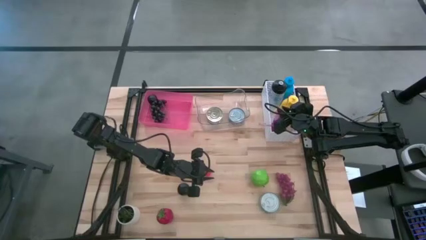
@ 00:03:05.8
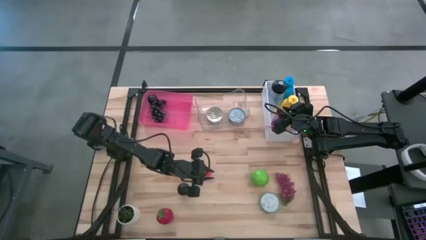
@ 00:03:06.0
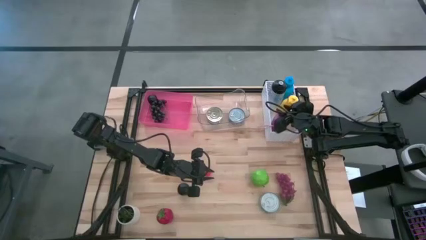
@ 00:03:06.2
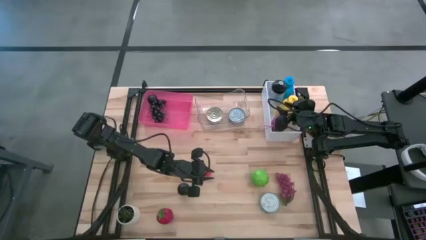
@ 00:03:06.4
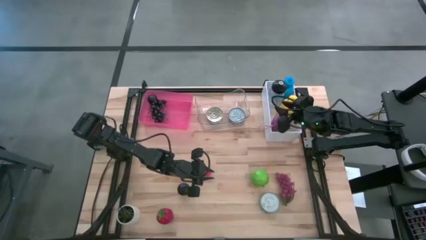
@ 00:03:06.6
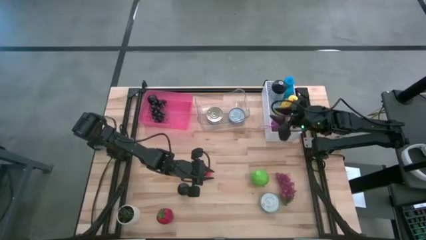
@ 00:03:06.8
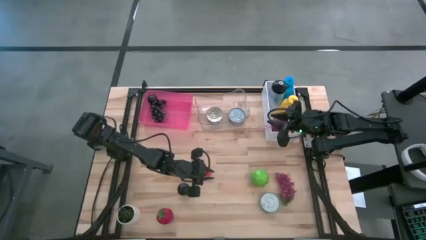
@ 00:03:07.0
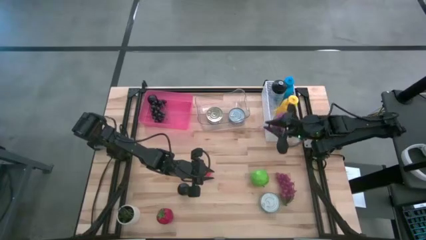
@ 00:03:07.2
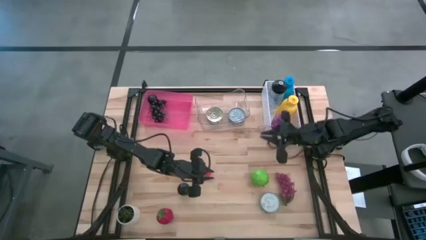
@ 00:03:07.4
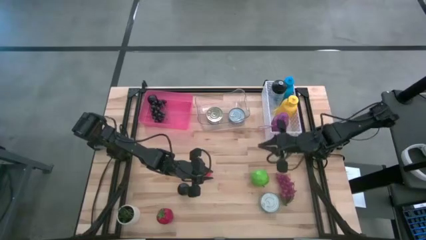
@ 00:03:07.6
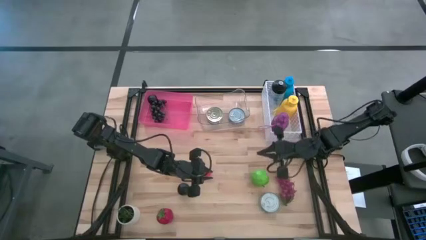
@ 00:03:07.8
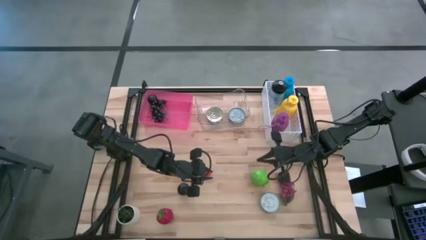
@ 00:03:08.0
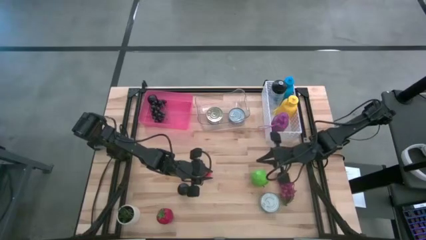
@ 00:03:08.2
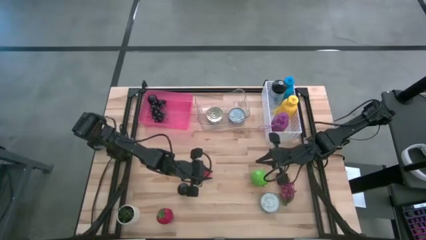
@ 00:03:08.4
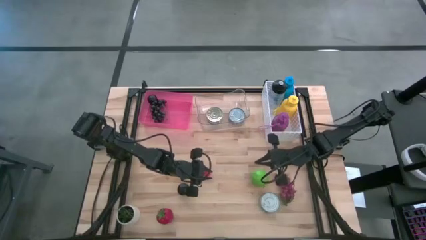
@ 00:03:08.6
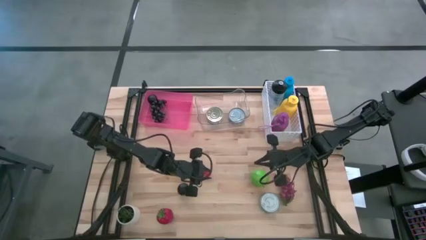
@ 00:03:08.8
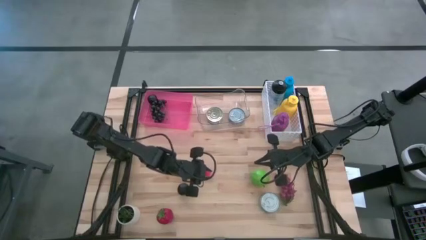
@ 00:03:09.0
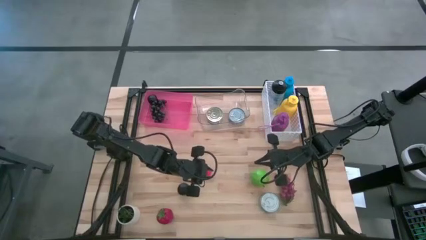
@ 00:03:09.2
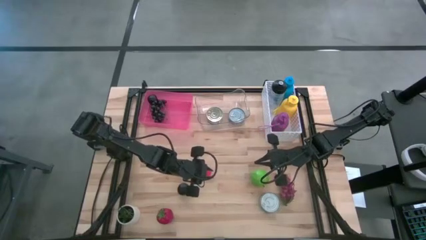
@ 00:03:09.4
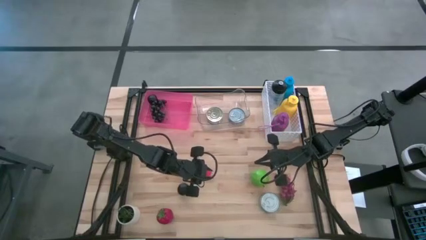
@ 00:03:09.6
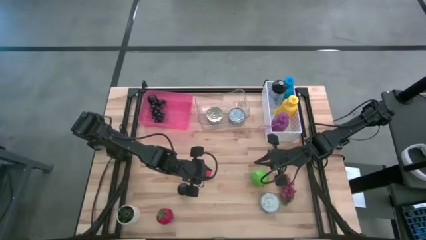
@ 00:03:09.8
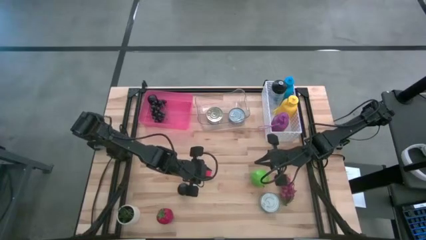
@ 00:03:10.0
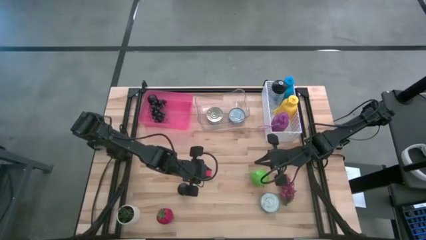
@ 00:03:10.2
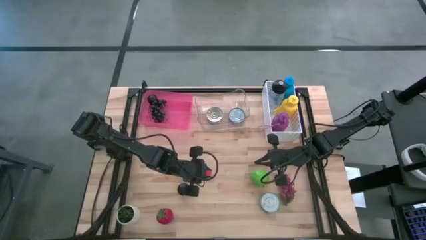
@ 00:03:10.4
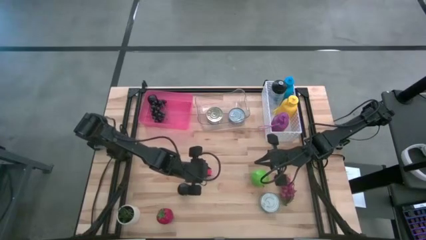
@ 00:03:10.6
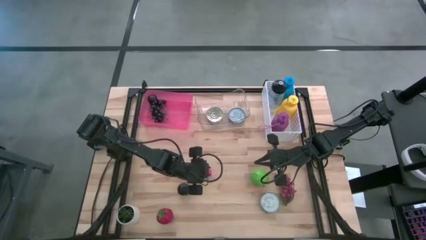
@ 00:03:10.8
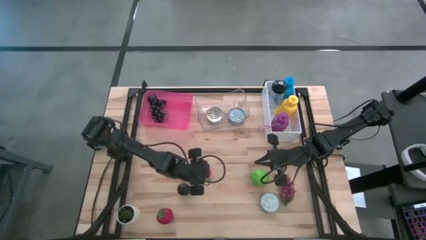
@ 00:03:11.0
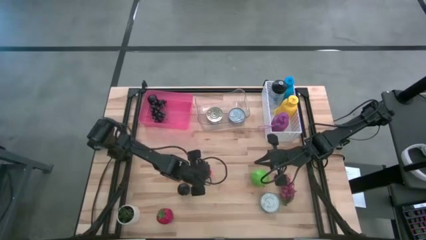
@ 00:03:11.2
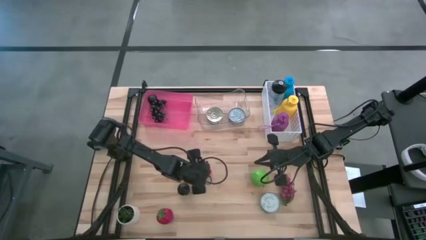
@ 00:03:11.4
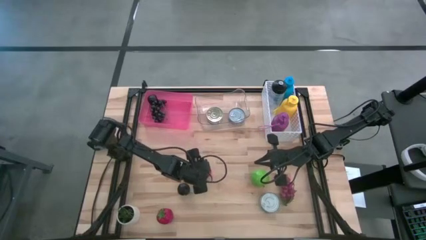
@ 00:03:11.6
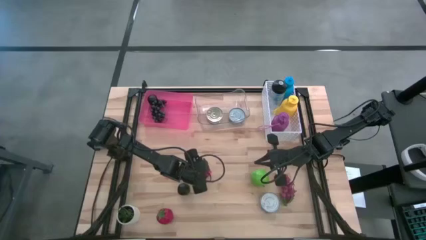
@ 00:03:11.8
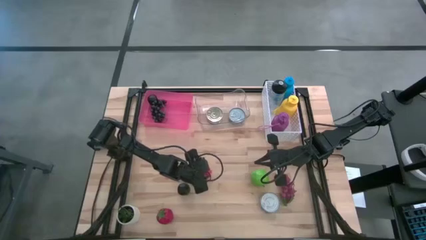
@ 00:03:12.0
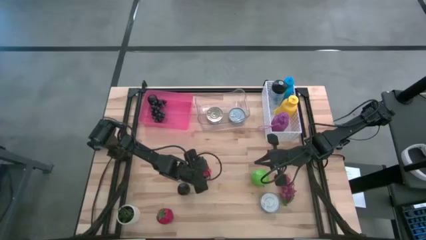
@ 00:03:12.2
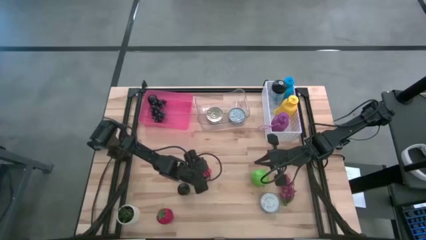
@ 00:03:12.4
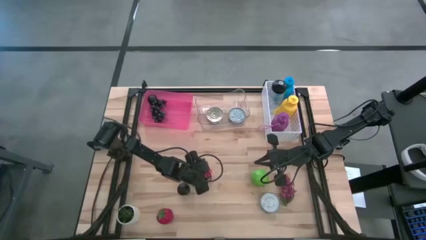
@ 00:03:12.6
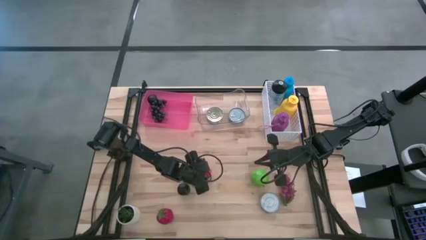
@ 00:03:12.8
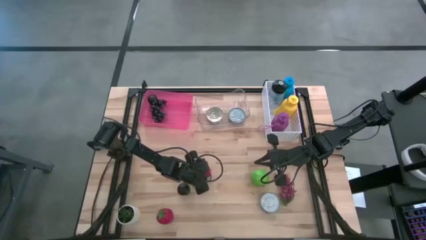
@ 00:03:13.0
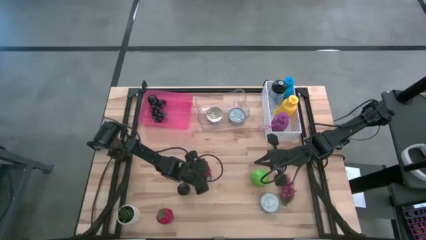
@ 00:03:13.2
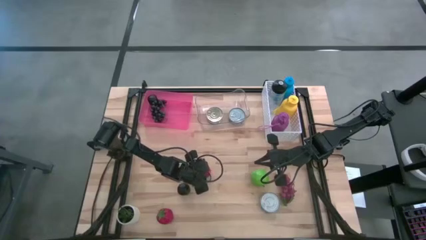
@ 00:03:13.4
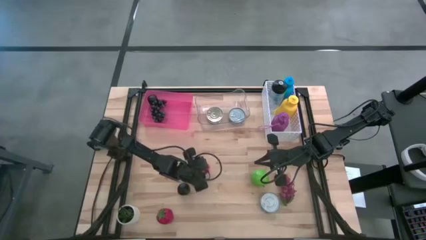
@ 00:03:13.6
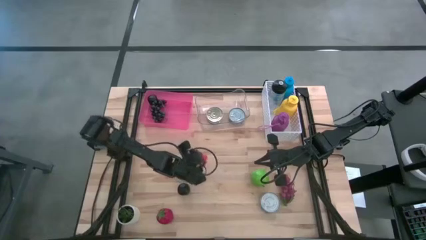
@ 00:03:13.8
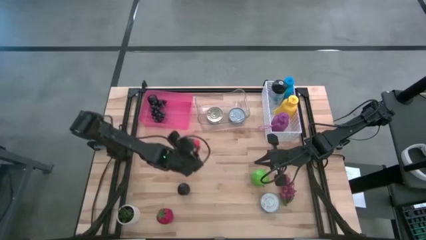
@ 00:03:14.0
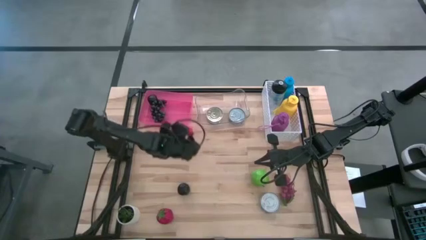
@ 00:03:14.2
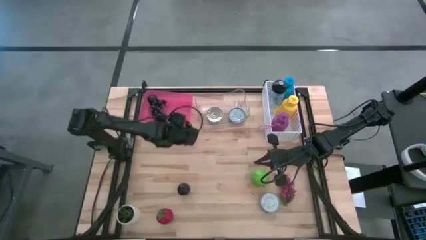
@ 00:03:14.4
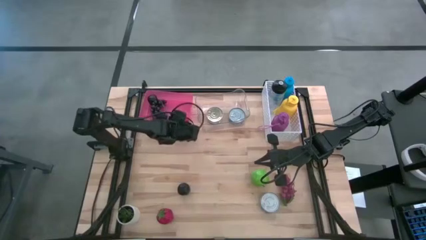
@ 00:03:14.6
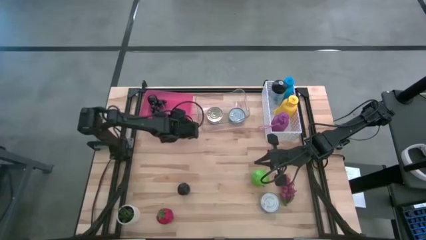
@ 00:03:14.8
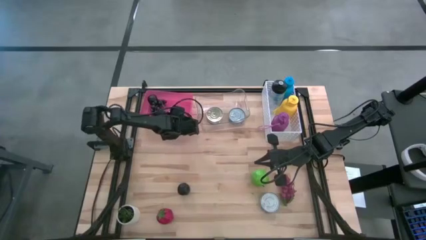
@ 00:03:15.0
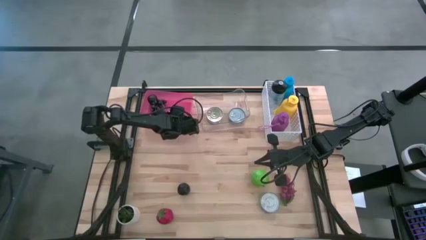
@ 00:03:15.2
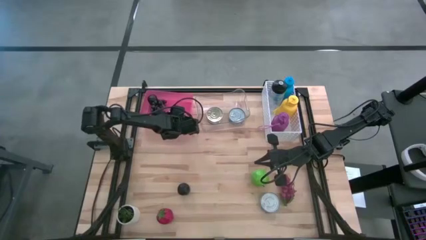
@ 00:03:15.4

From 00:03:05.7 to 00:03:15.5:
Task: Pick & Place Food Item
Put the strawberry into the pink bin

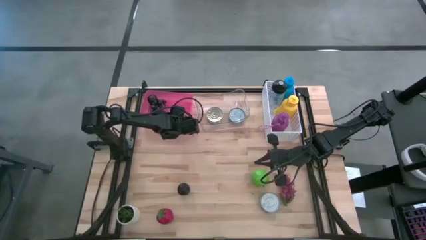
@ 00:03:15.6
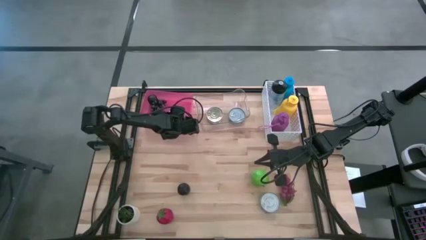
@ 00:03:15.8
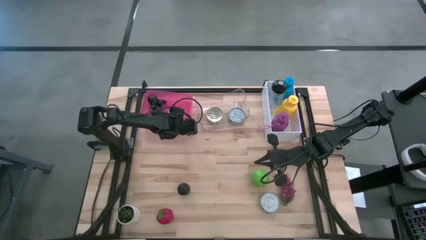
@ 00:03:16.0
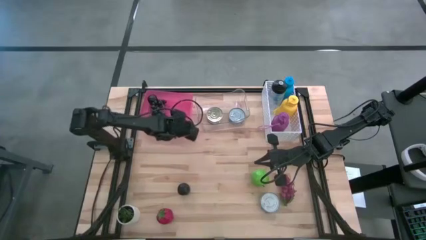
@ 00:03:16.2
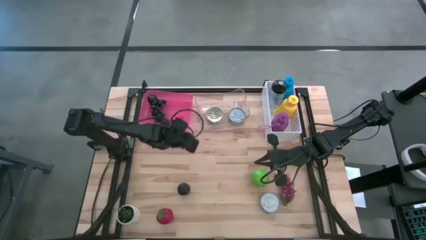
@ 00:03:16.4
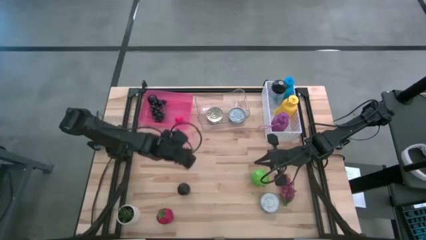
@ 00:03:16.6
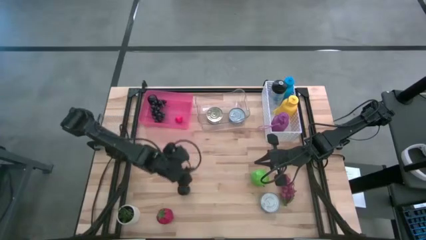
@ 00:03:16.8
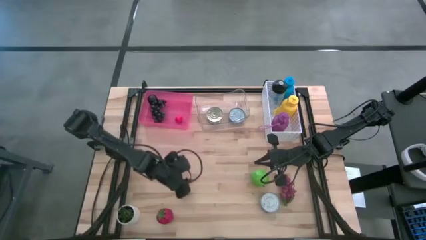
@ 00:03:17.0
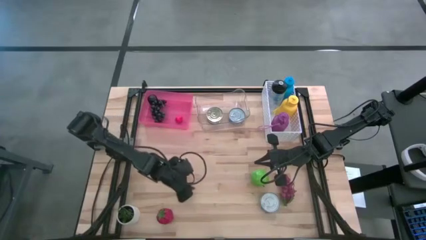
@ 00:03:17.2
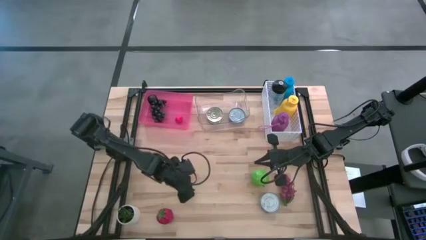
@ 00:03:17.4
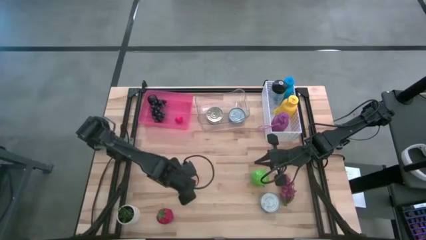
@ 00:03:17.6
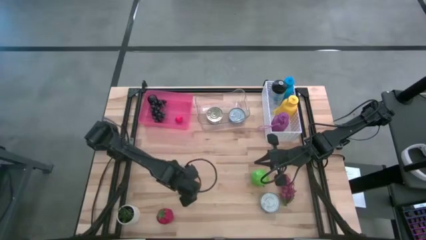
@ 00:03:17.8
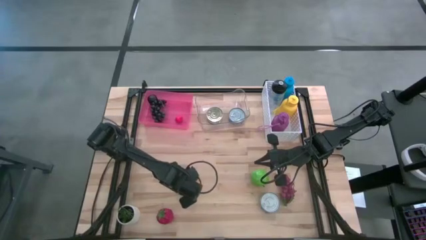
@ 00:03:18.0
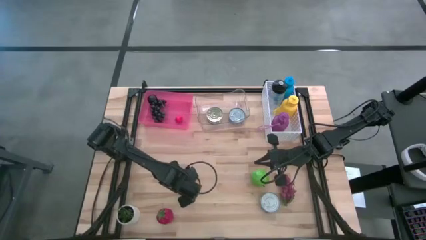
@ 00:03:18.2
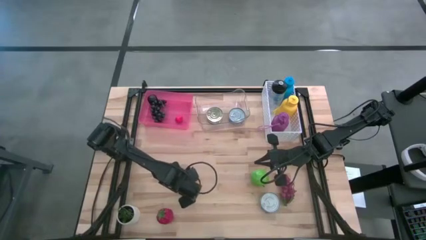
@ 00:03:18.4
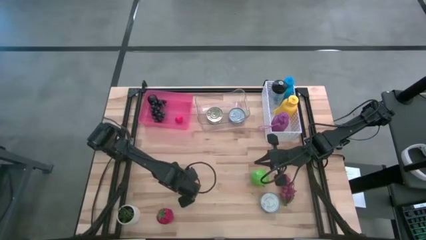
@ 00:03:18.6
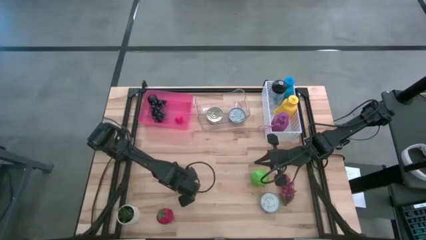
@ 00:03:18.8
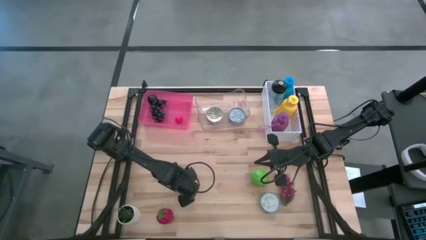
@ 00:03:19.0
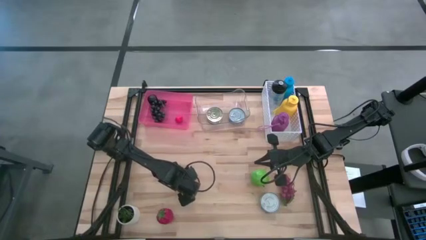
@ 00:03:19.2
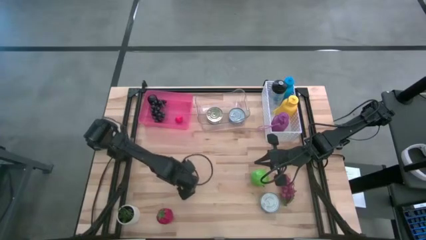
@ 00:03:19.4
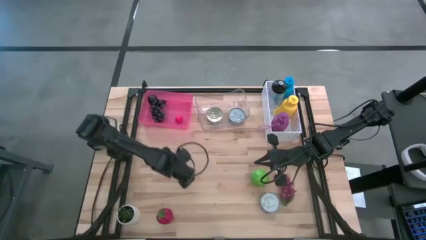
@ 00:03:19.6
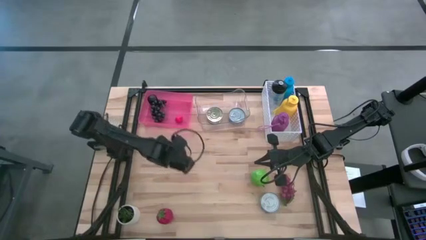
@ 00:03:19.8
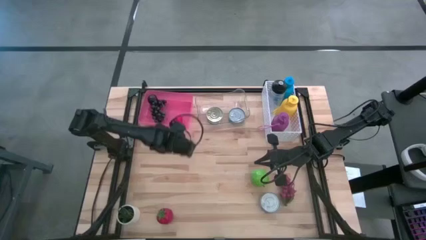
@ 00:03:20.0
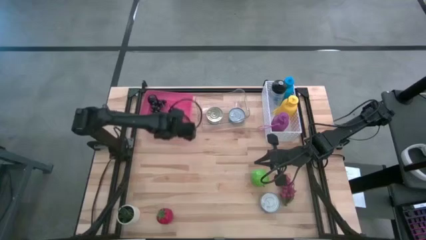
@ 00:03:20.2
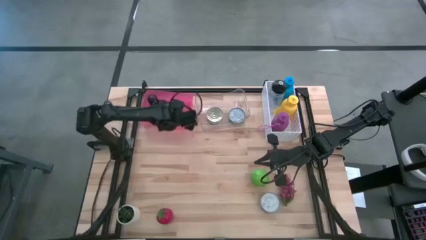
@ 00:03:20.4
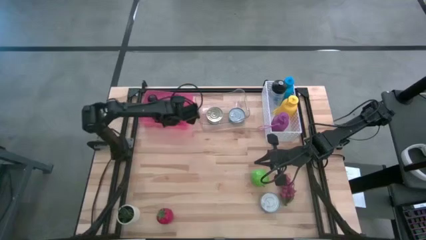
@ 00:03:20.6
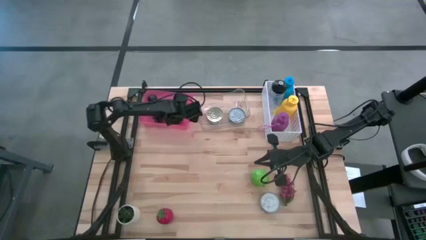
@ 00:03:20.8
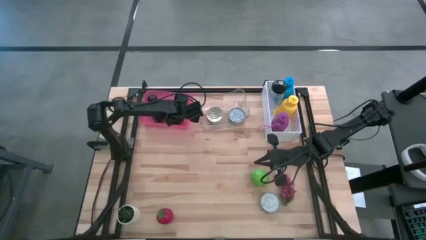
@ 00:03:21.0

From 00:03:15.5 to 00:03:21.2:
Put the plum into the pink bin
